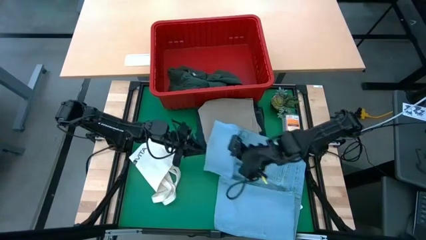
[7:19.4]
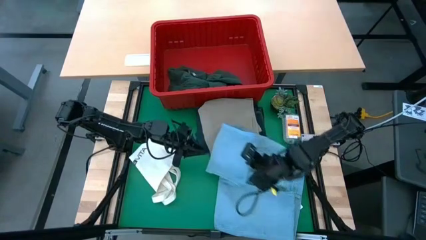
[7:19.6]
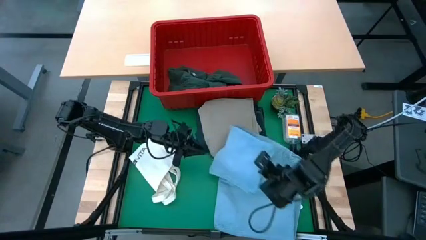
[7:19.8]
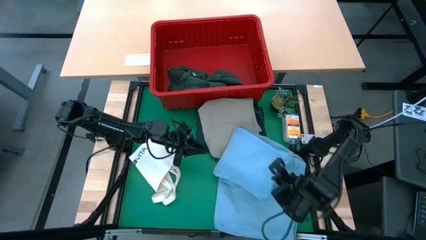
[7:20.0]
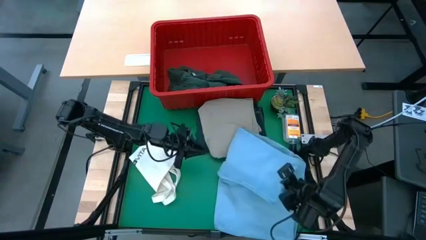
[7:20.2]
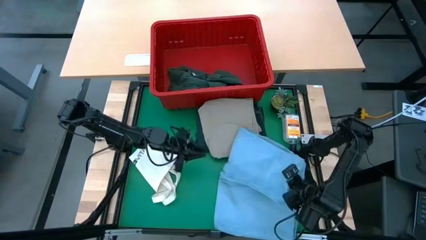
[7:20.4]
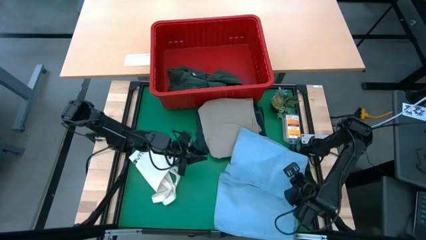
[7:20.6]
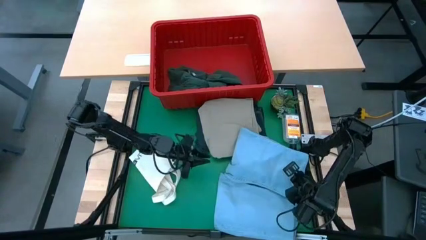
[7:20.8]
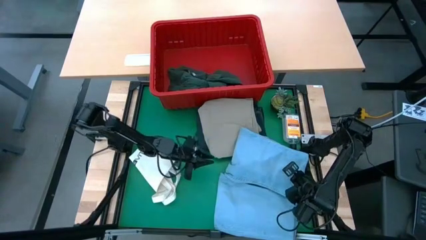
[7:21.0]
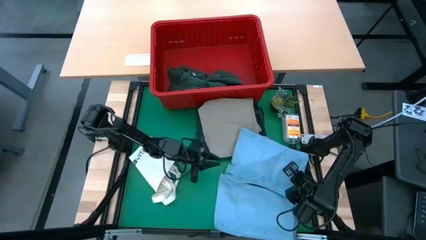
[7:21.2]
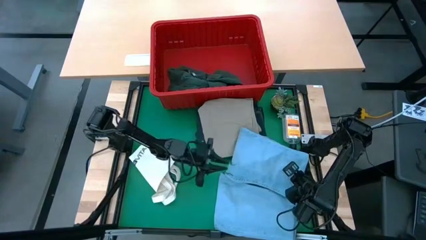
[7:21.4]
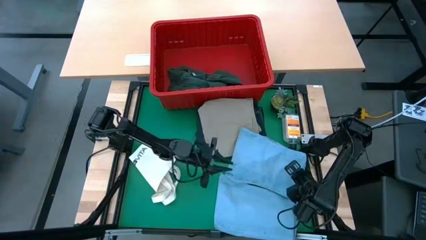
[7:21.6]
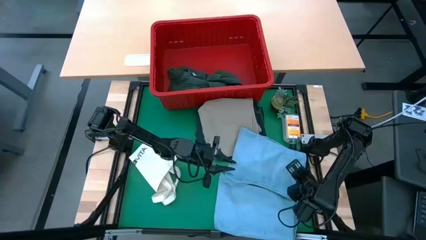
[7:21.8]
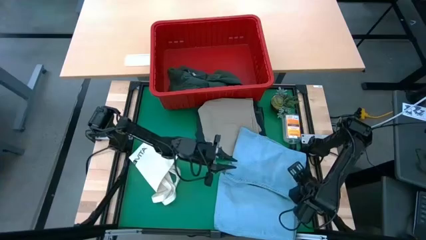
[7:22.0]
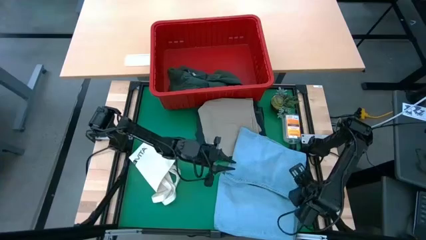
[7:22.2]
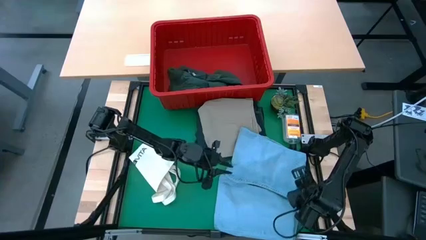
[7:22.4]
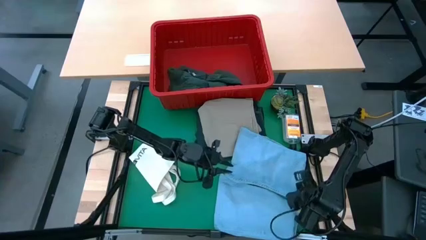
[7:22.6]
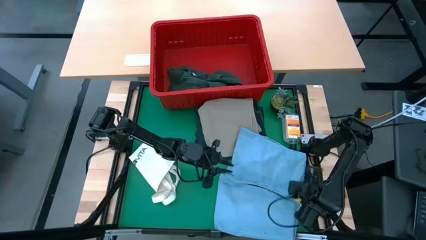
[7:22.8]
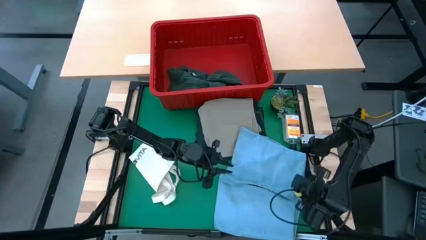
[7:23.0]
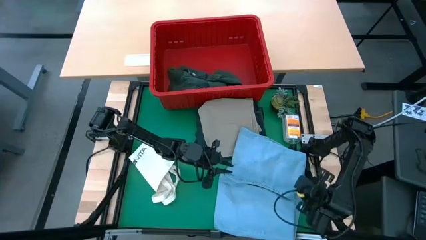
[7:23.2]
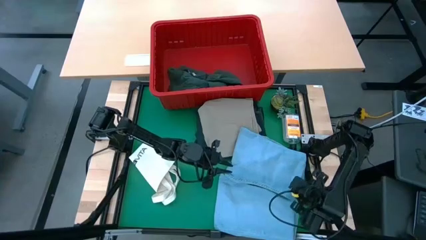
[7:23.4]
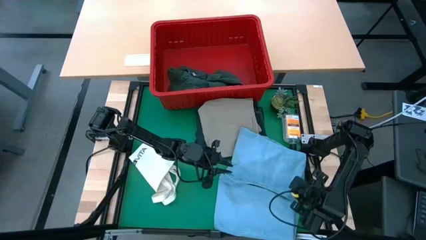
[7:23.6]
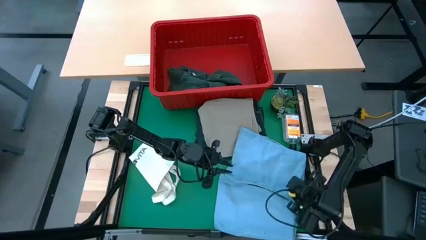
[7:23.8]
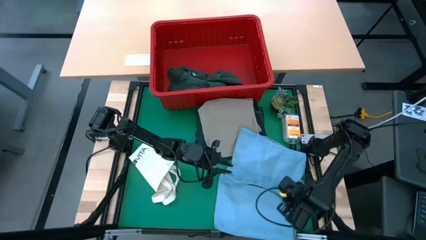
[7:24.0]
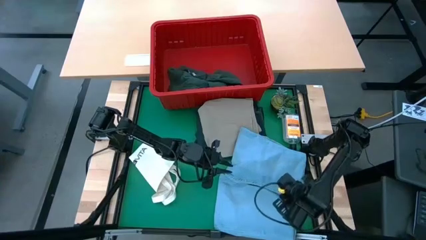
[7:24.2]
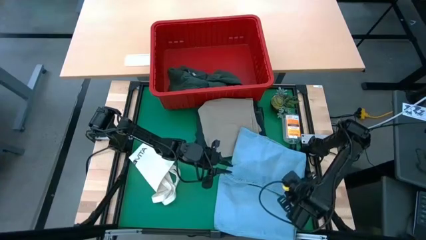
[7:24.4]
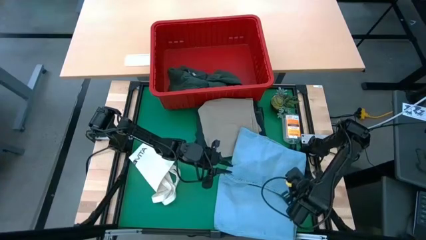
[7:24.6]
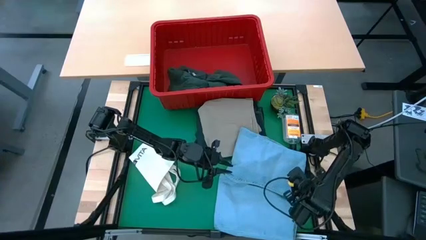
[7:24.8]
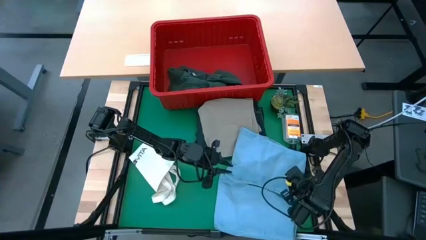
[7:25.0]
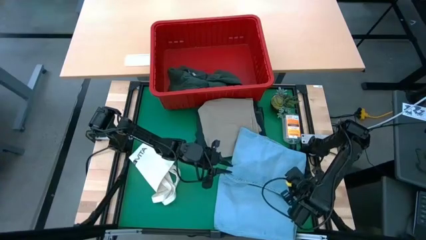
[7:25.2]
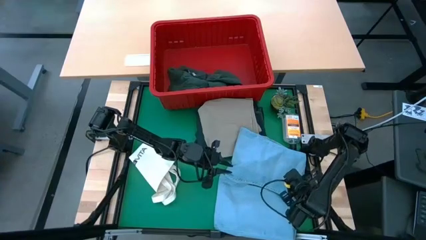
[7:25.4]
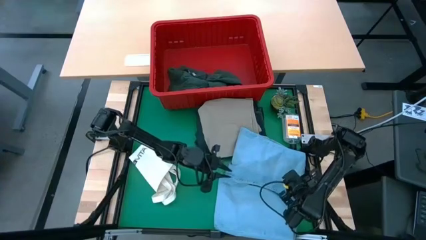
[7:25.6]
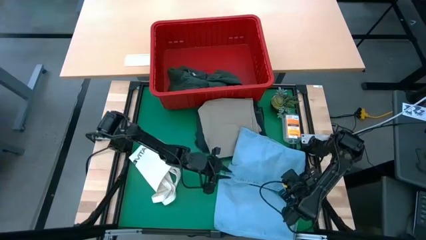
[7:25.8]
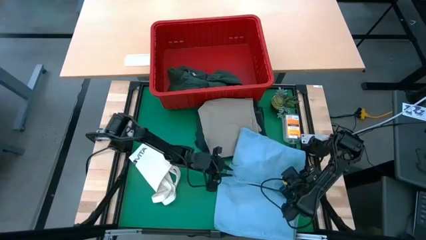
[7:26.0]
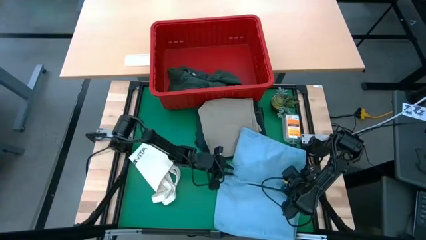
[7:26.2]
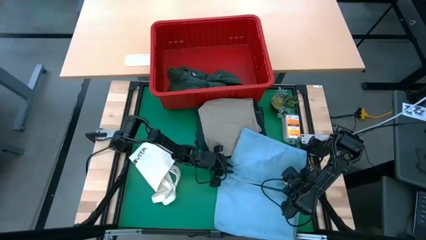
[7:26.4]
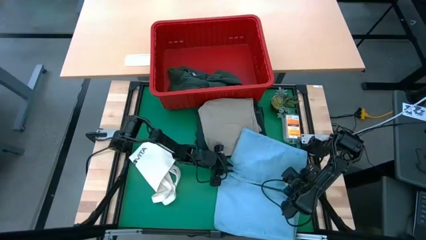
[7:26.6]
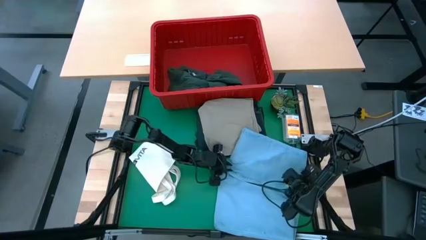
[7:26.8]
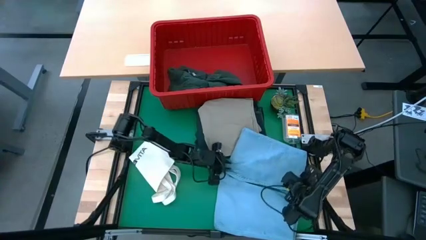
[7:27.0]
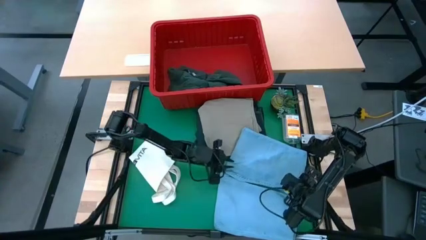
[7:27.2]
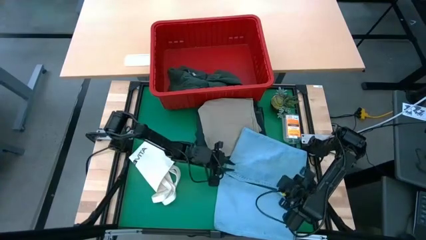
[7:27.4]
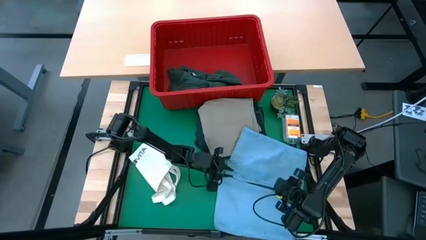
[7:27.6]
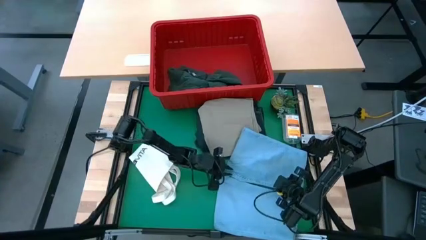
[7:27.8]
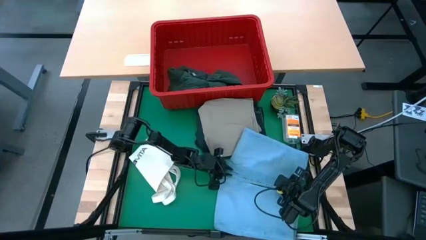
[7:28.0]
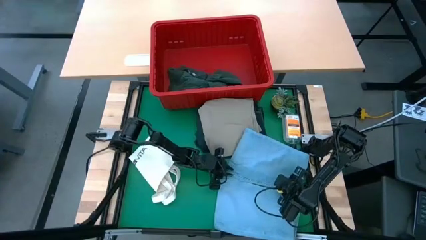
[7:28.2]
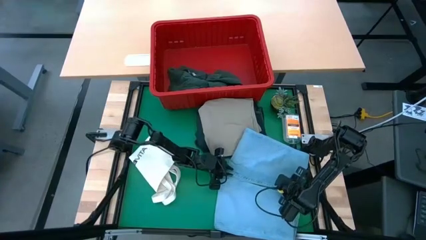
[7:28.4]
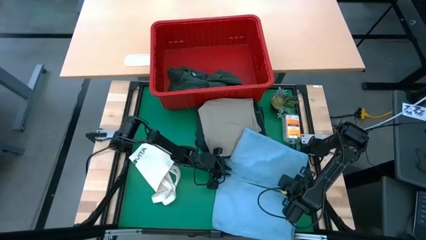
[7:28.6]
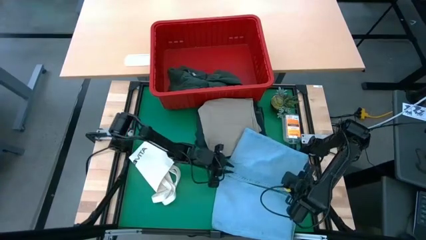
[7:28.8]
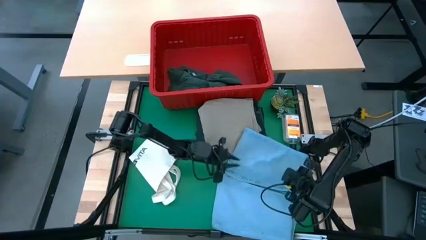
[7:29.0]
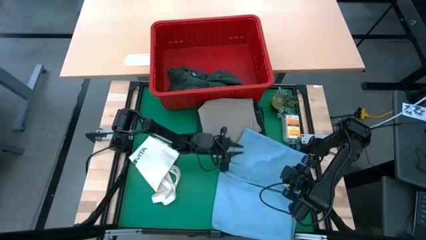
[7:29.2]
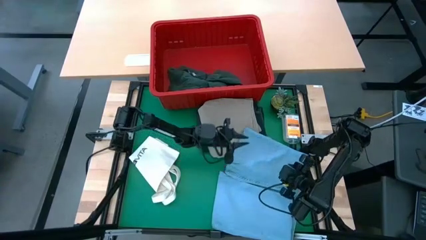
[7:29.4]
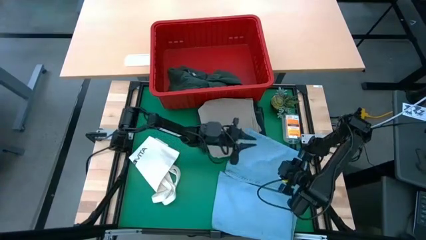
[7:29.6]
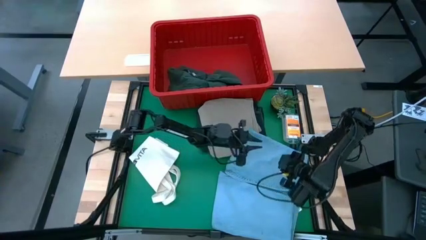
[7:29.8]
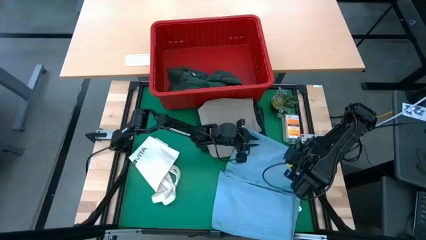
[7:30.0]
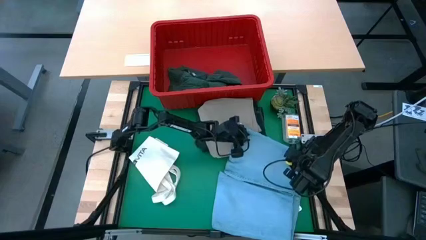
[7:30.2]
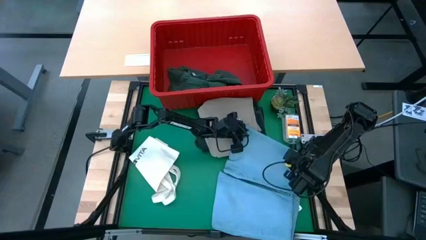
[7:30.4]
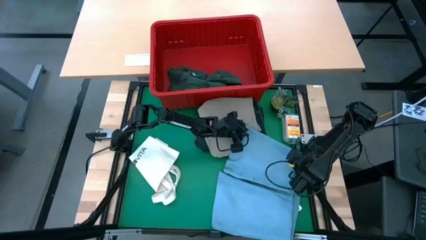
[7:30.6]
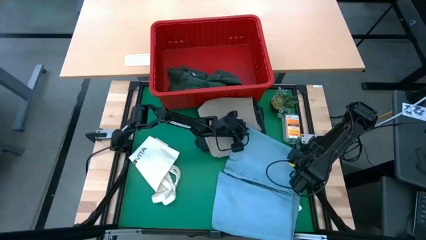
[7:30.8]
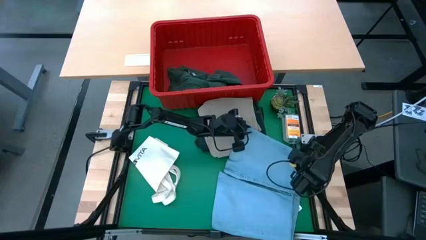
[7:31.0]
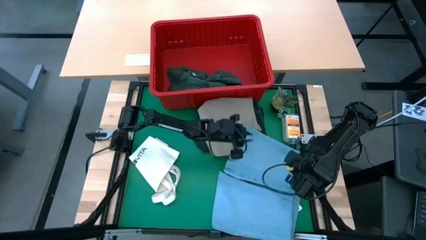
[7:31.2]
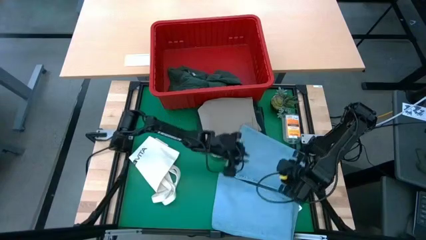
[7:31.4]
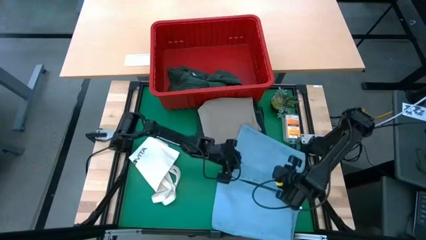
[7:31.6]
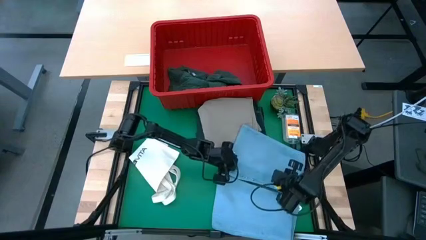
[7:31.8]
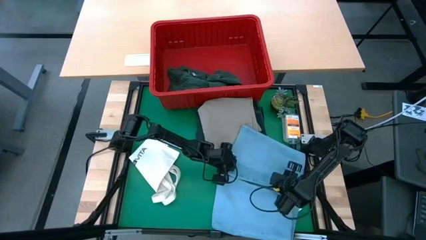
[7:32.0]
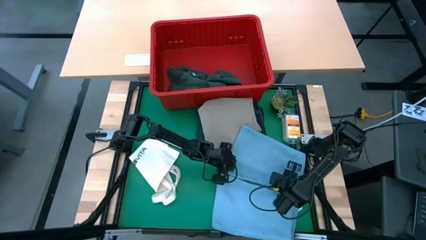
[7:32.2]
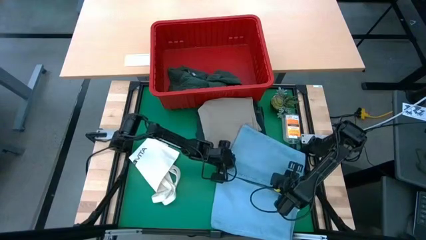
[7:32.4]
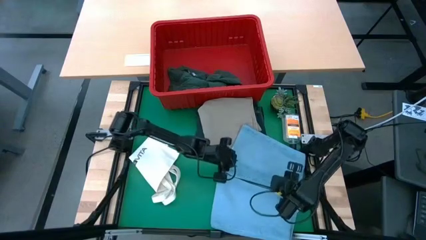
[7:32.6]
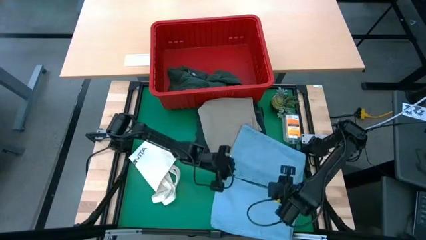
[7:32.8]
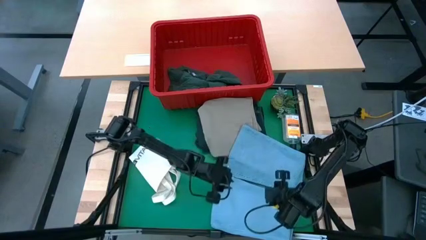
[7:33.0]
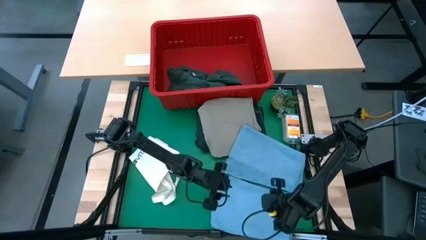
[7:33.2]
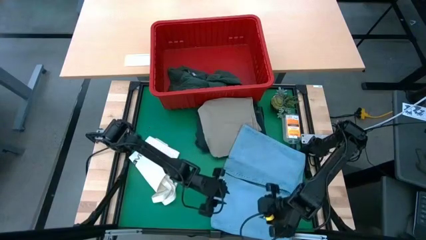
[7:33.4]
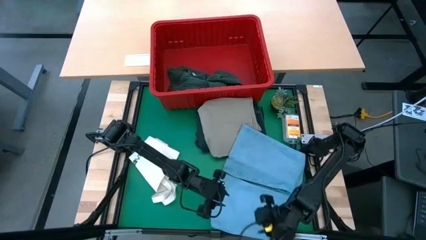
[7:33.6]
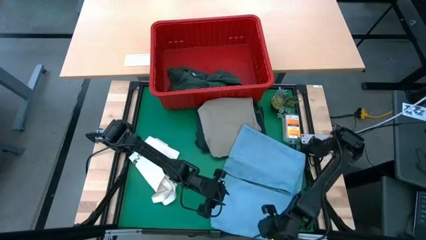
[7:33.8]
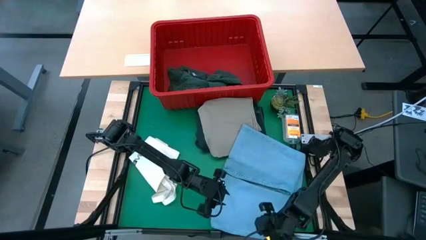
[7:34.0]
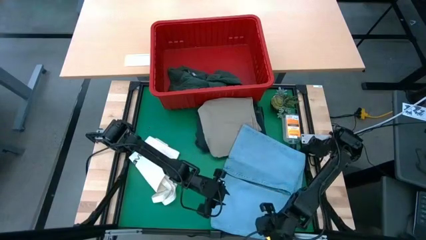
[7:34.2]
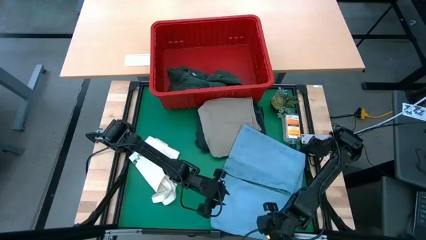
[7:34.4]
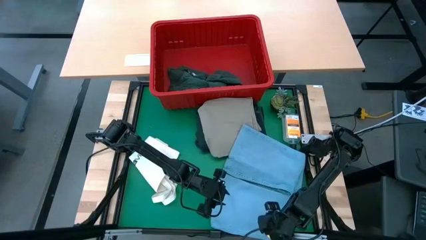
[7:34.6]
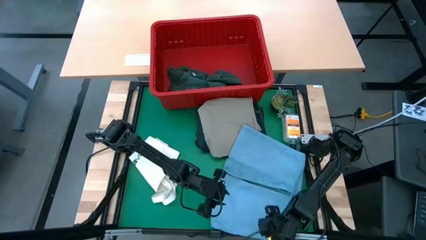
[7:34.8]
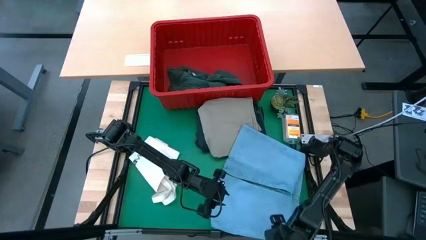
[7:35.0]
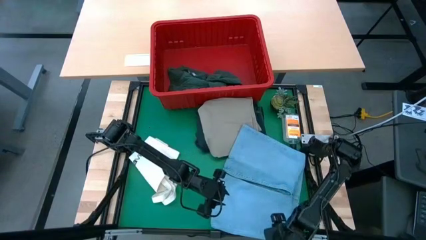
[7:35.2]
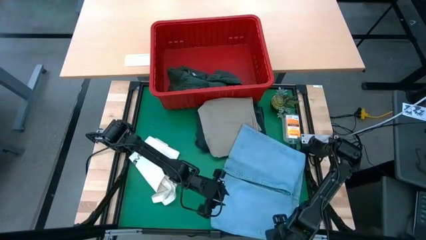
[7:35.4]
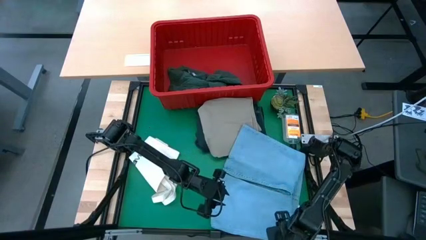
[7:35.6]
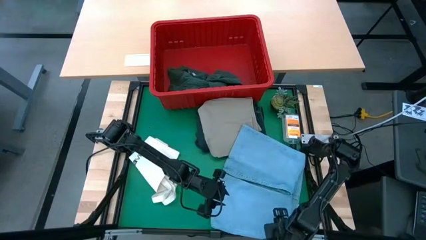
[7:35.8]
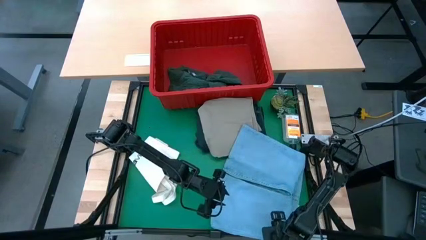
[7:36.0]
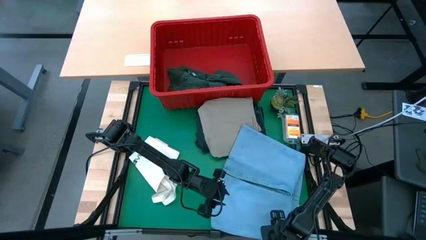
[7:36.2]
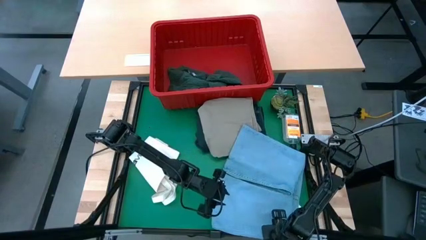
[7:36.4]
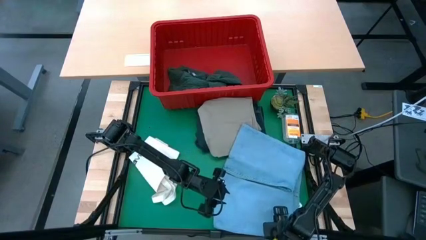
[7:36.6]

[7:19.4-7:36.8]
Task: Fold laundry
Fold the blue pants
